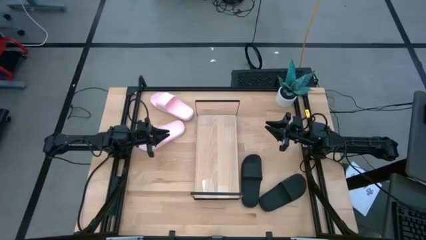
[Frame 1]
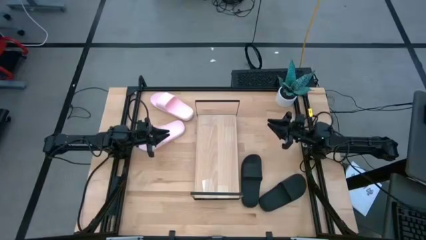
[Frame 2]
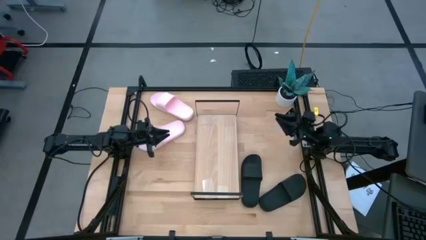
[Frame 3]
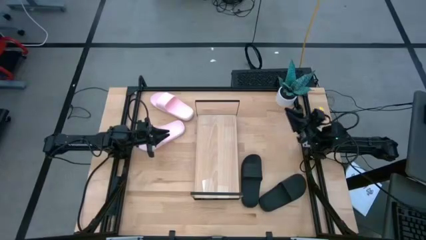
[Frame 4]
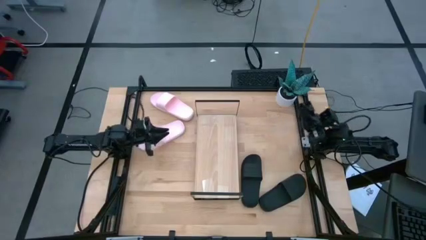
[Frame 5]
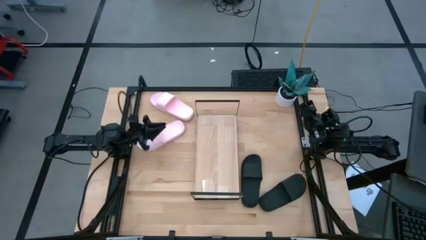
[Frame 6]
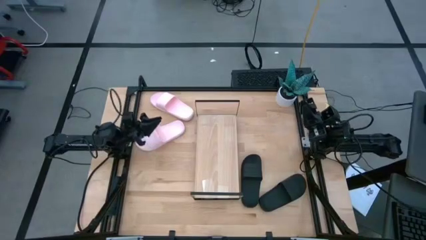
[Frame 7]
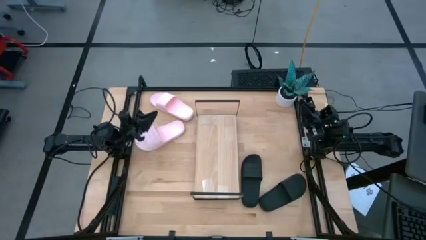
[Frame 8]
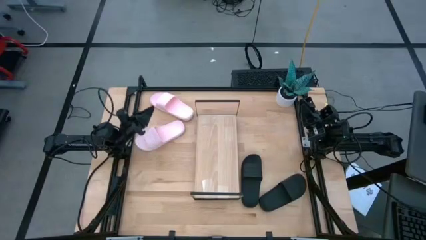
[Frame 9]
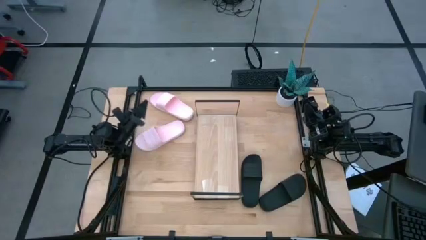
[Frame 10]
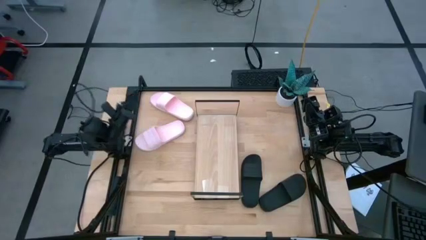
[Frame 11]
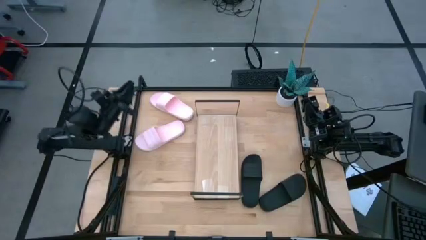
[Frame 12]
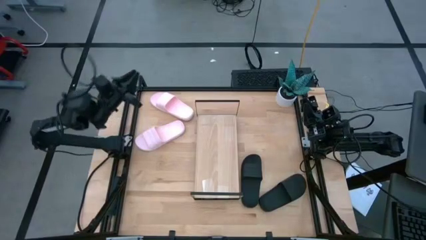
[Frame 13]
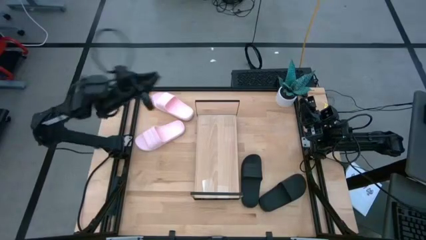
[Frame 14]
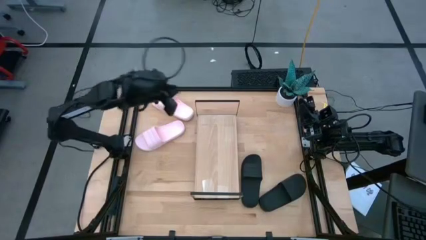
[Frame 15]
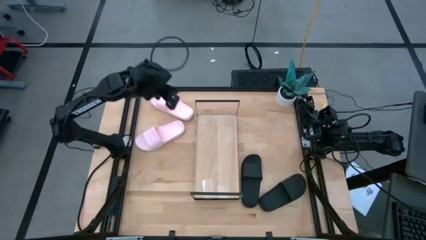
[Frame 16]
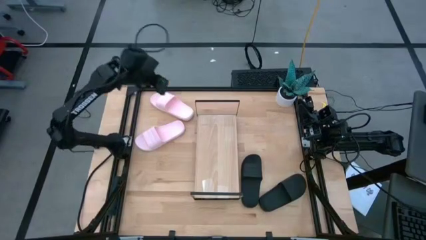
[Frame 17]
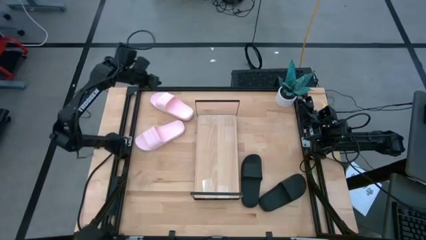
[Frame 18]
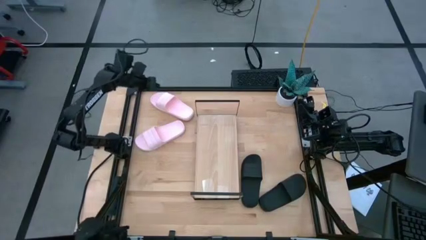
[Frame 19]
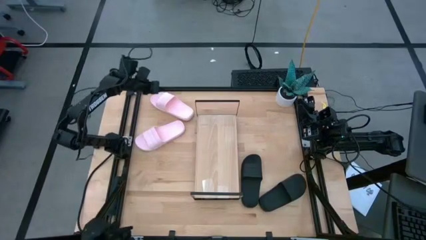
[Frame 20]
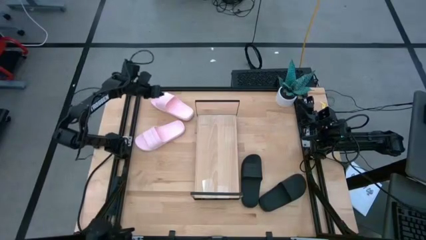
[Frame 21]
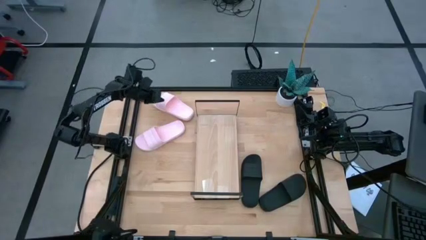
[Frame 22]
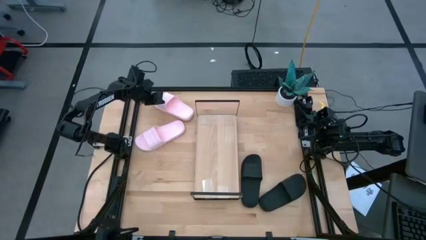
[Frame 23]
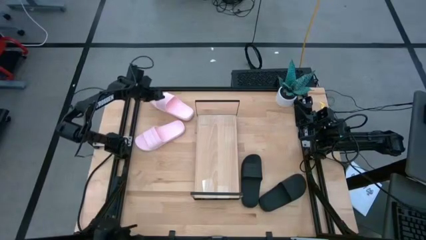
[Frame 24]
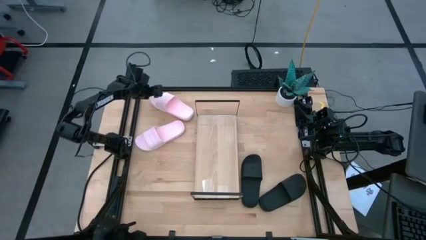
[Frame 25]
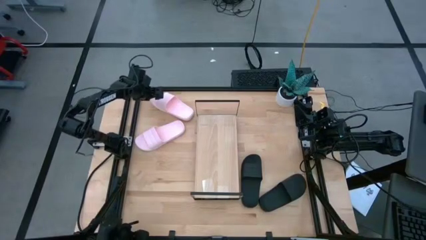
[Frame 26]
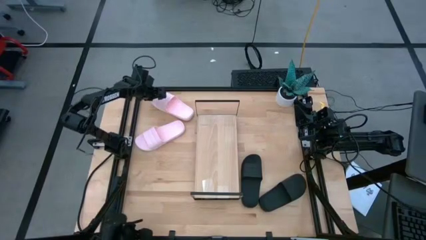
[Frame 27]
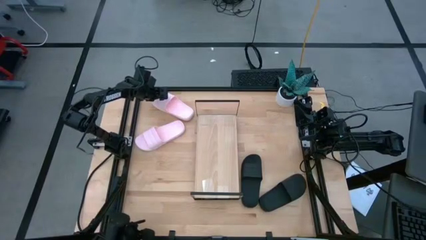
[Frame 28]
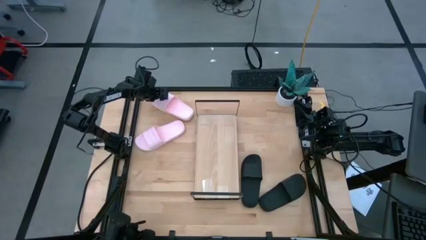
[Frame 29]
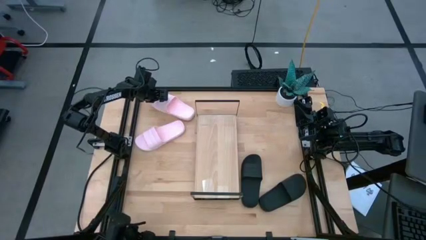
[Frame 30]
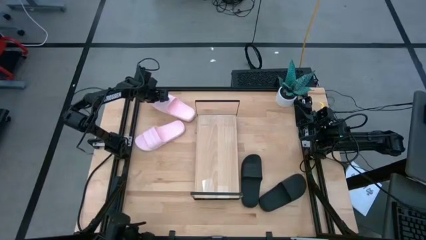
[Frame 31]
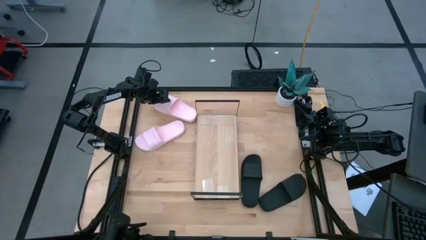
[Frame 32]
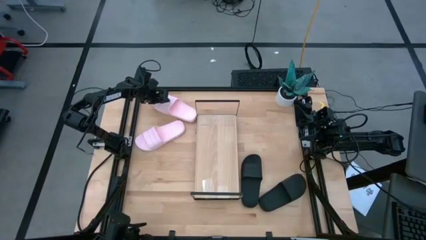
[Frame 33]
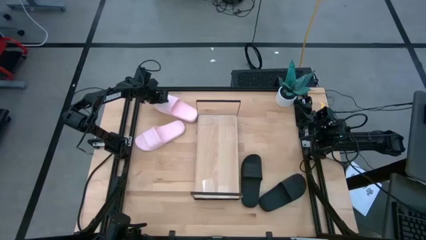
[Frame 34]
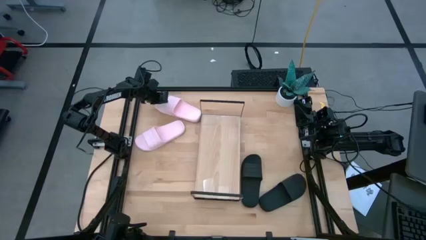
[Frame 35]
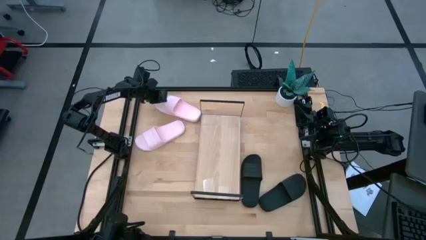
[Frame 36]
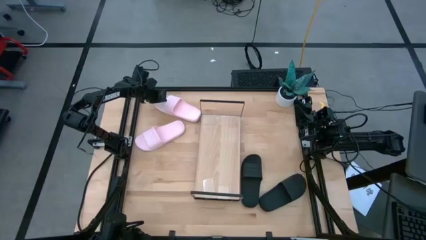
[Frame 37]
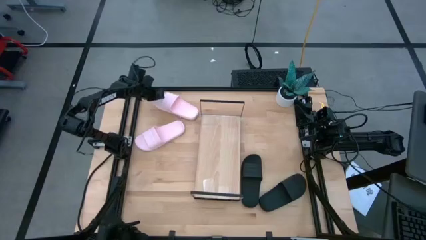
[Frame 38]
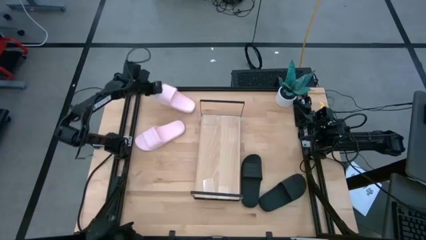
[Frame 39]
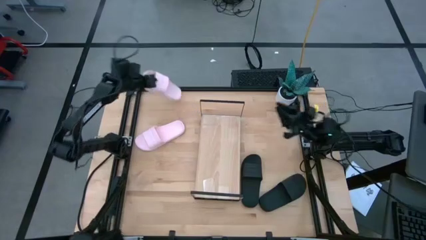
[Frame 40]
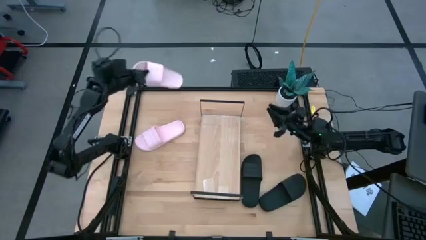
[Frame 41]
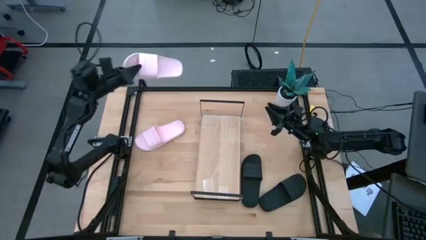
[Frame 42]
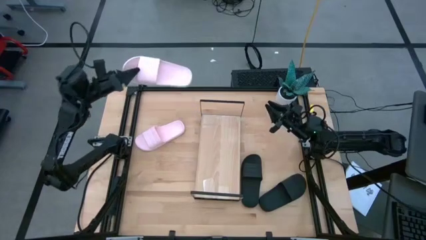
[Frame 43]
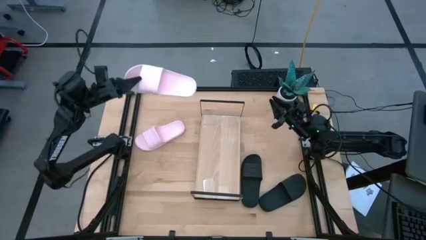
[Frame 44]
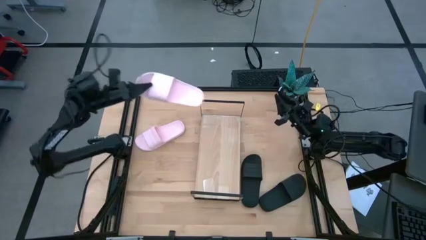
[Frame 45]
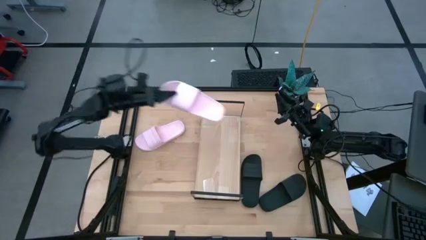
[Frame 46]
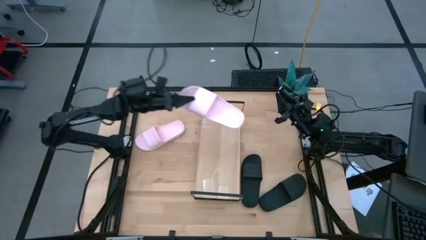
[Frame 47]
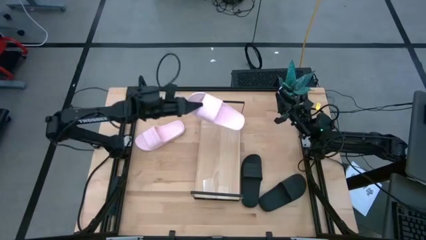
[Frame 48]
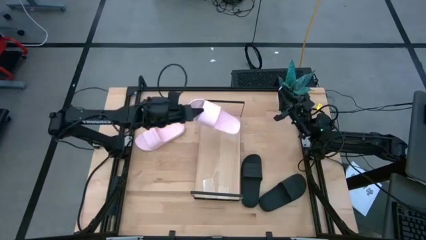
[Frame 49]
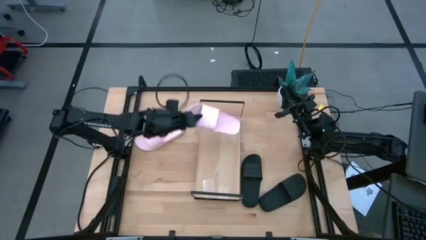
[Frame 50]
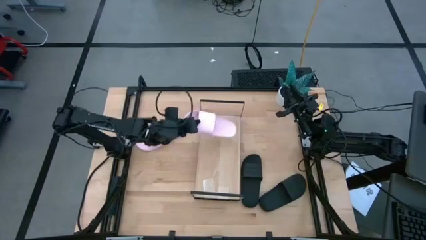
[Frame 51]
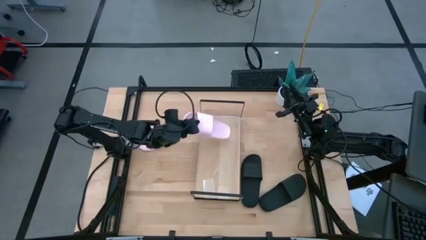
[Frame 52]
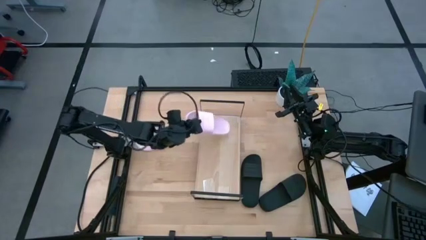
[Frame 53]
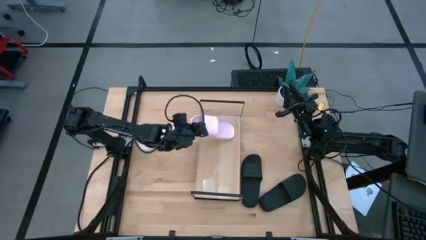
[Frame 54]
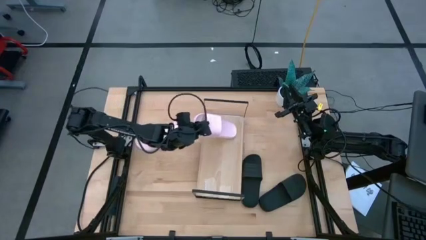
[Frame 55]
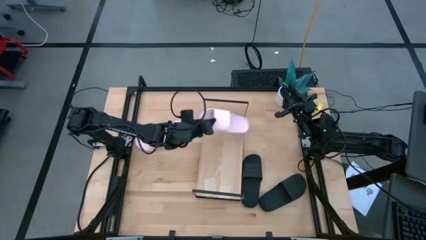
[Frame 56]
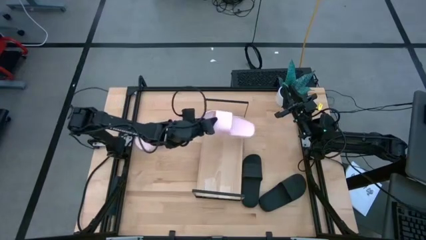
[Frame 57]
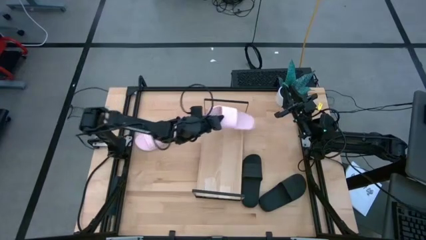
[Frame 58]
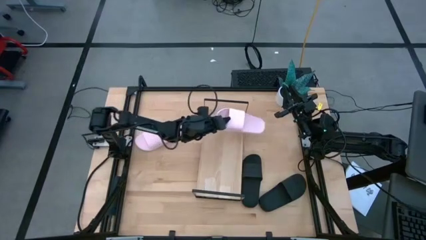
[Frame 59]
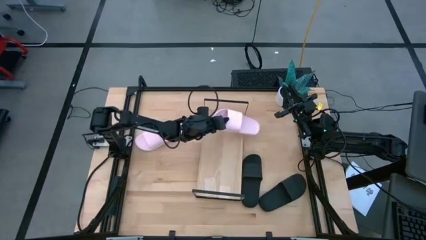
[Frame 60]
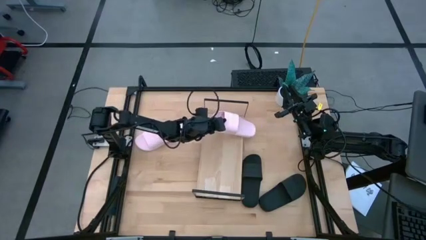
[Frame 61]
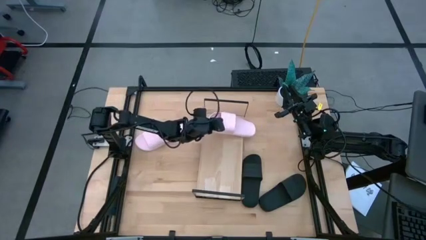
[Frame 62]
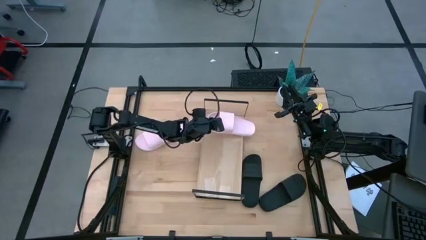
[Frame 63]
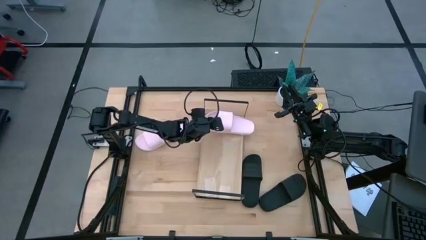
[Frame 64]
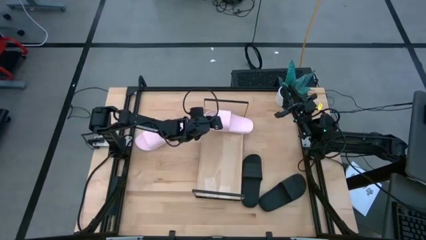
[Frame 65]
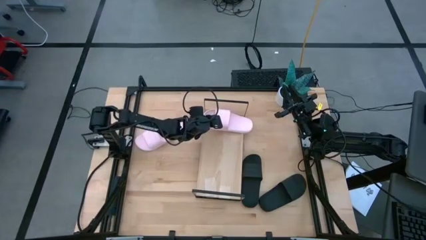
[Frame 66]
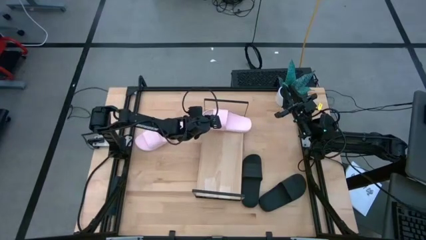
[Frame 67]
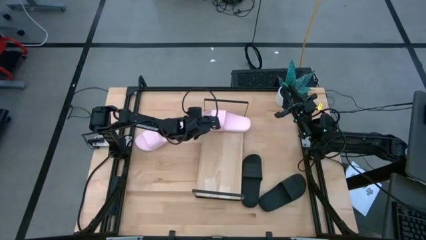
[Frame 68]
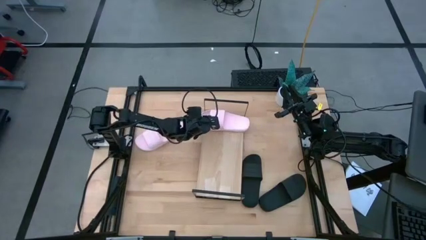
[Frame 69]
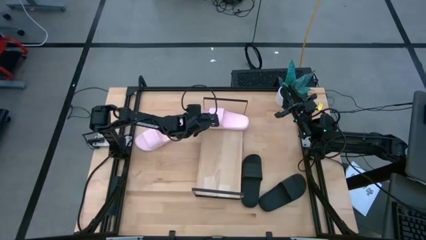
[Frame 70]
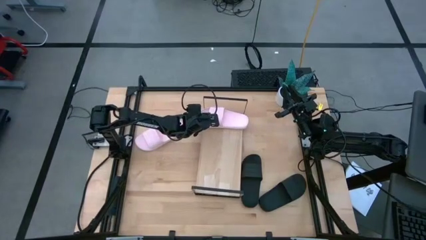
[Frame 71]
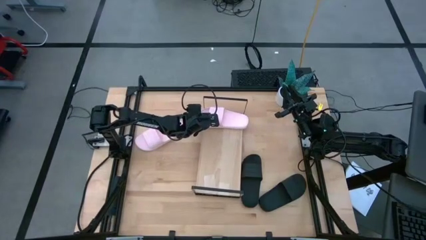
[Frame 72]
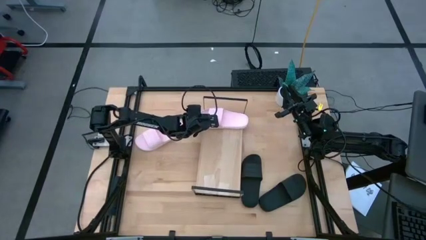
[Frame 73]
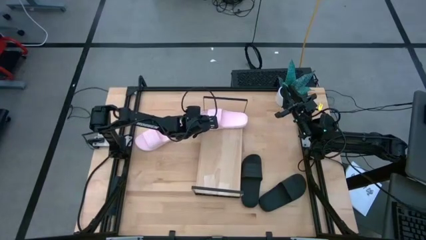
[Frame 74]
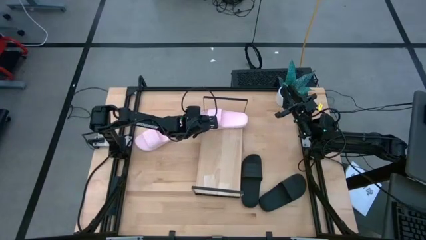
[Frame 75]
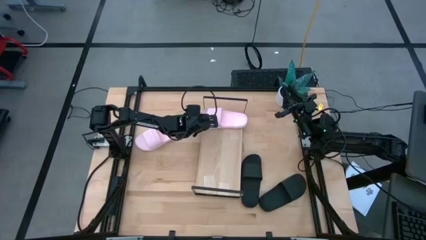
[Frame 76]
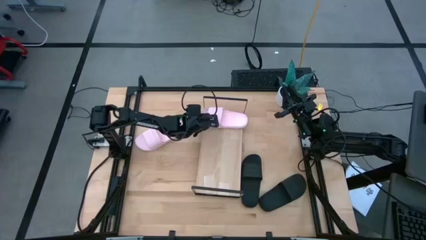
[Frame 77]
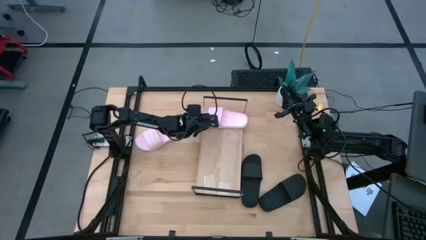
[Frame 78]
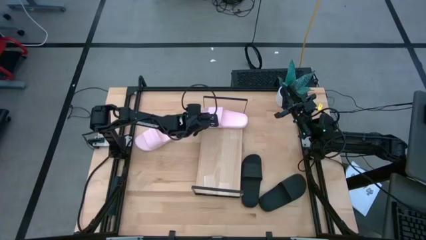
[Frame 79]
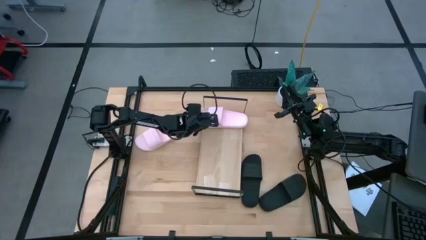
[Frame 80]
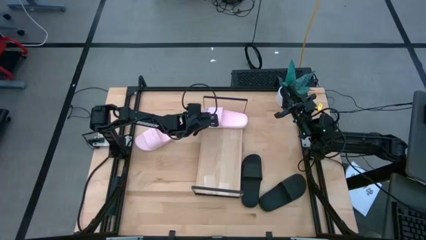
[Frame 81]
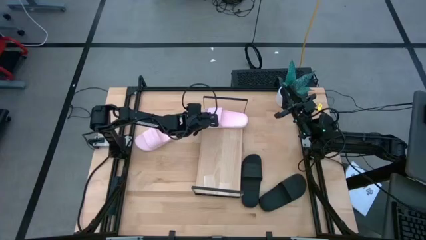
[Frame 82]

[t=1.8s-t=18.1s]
Task: Pick and place slides into the shelf
Put the top pink slide on the shelf
